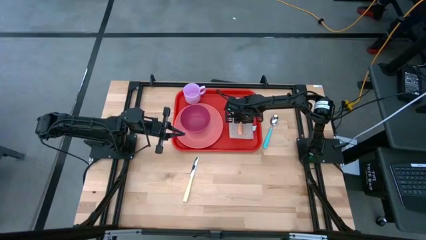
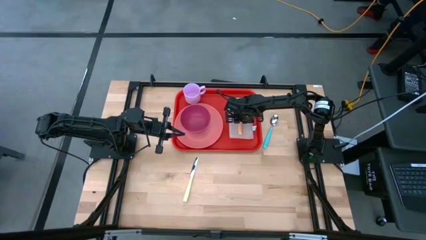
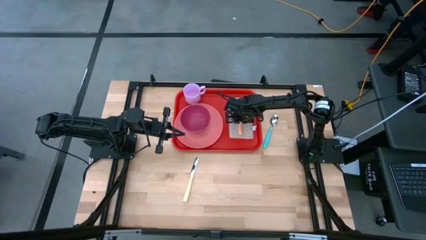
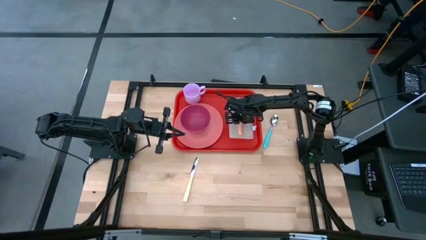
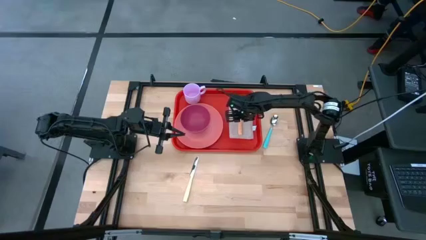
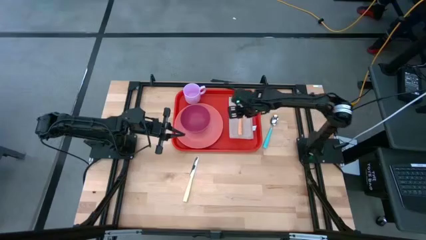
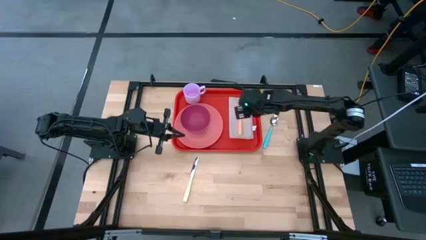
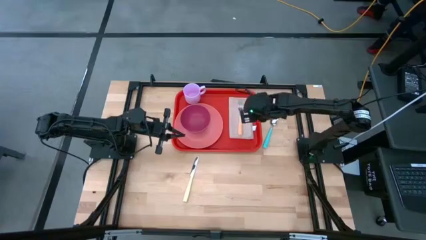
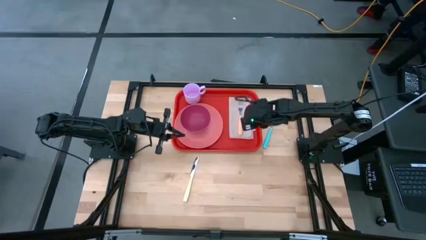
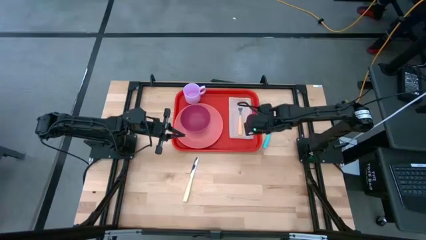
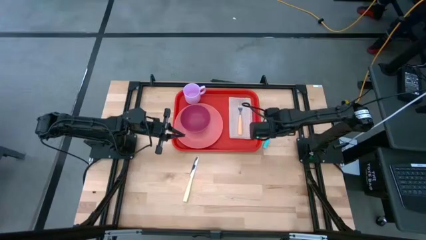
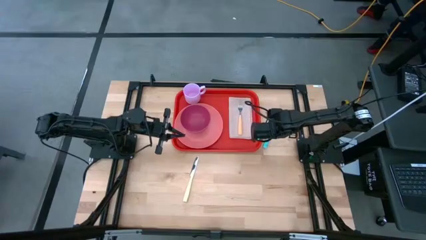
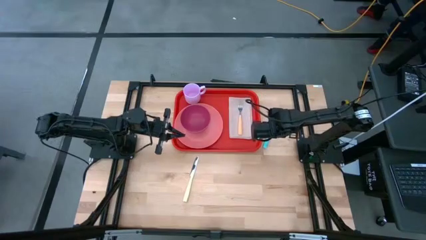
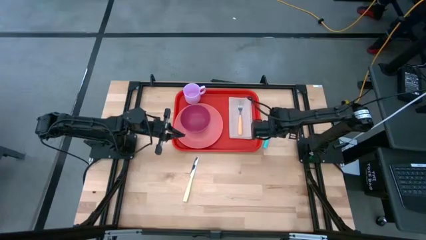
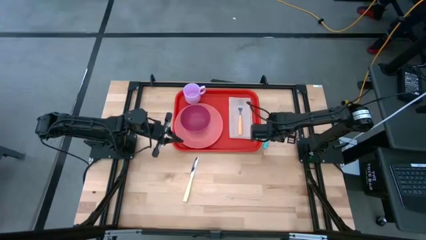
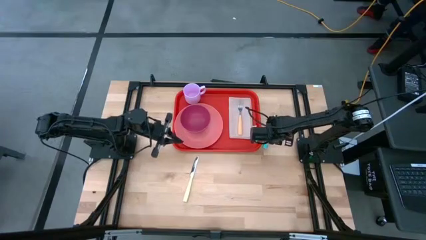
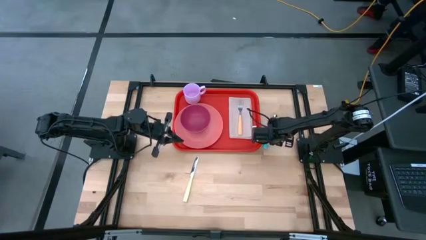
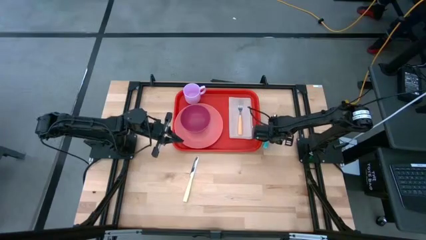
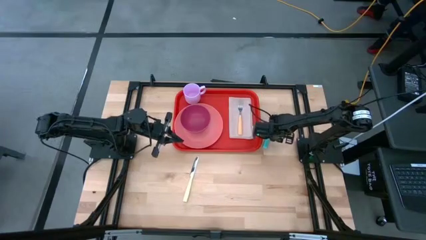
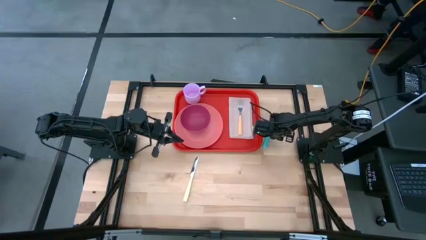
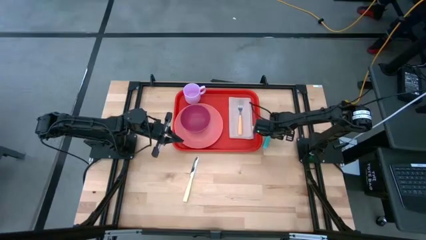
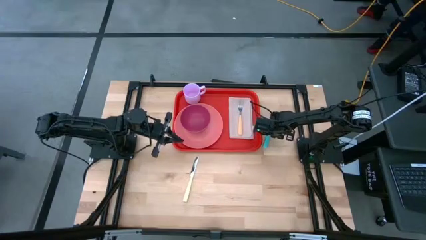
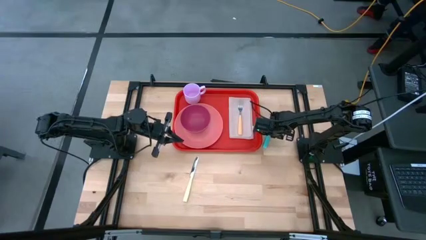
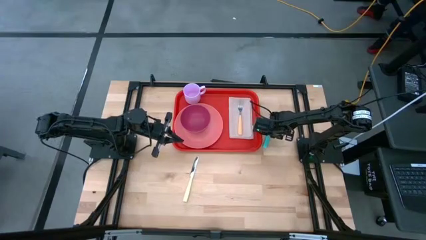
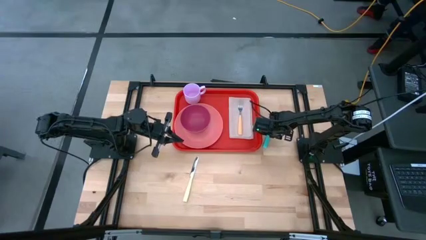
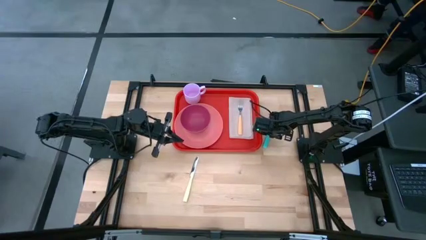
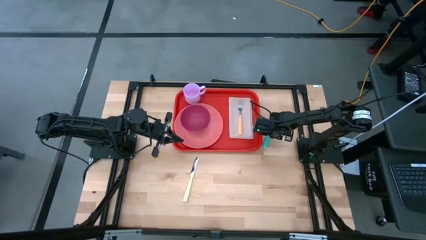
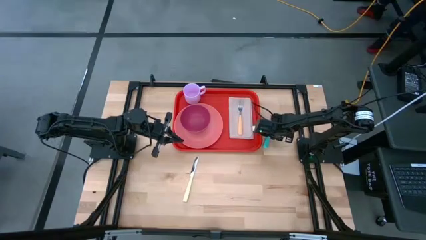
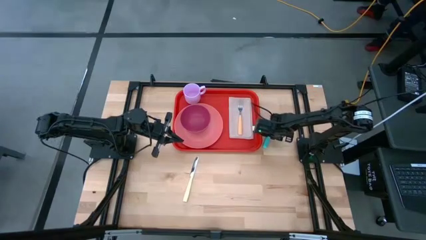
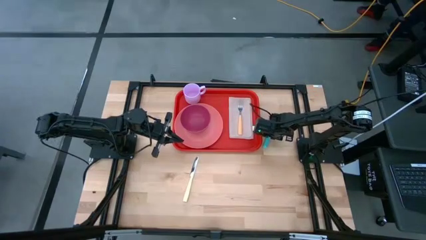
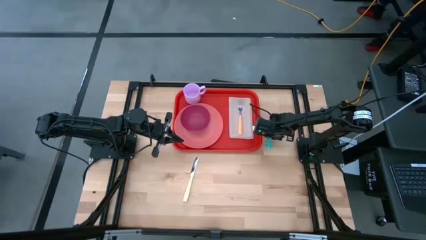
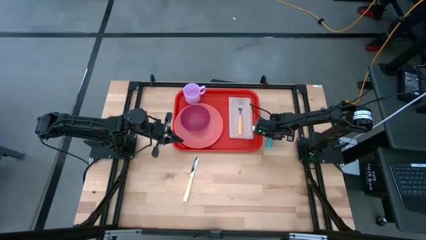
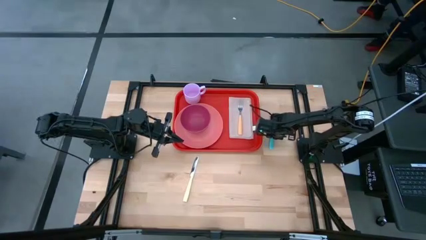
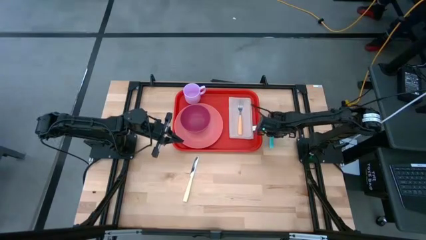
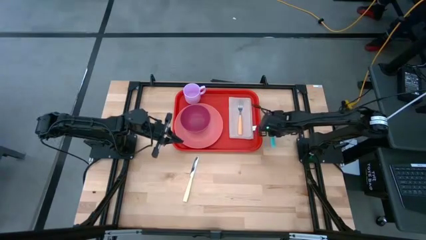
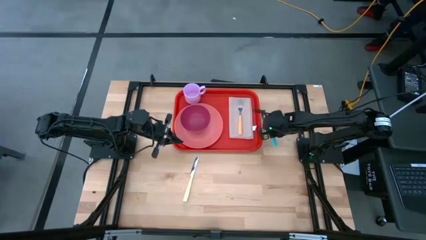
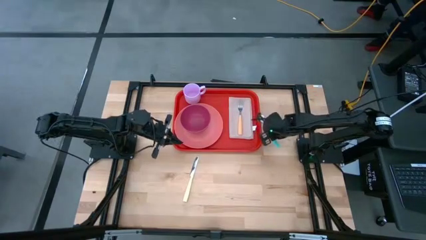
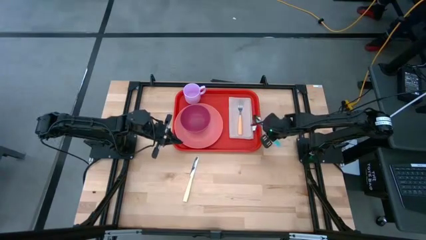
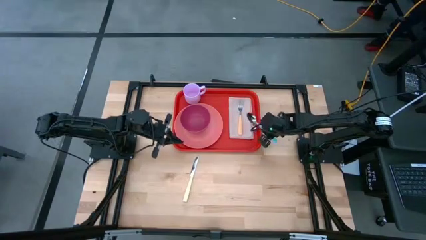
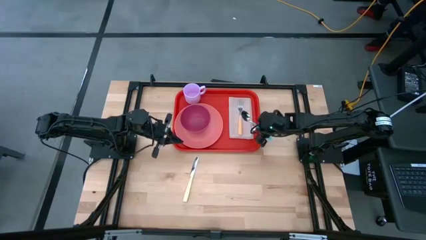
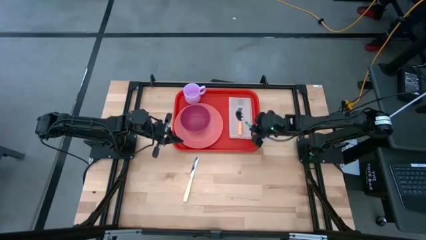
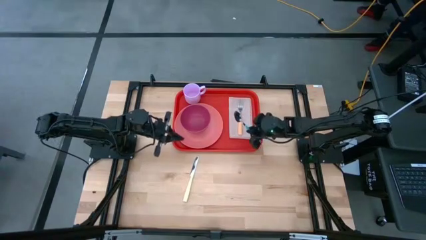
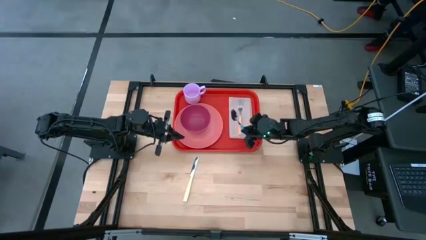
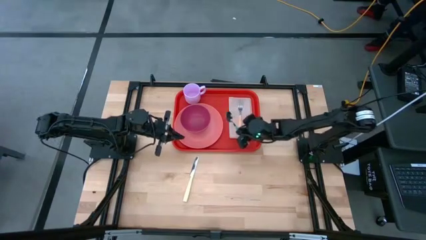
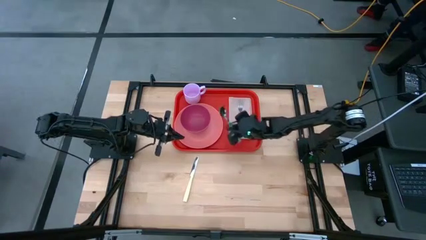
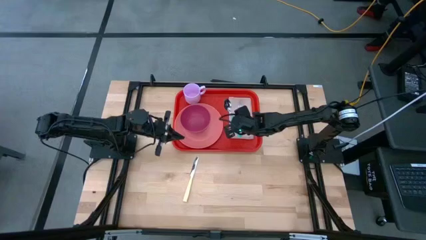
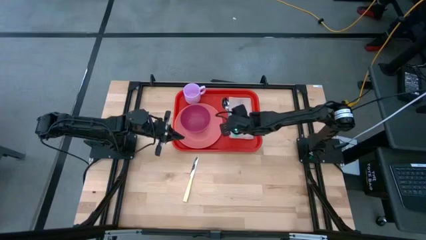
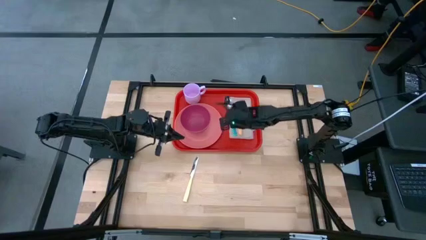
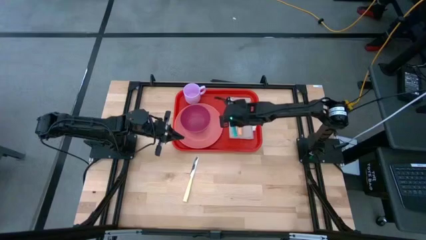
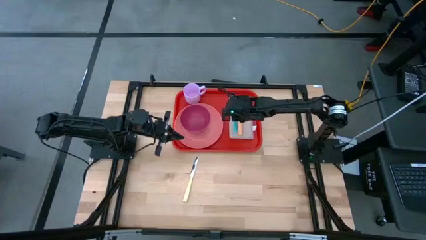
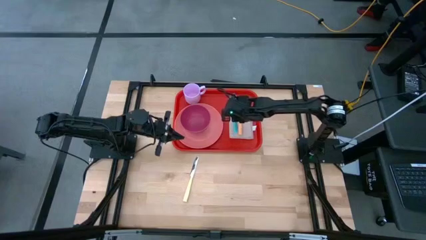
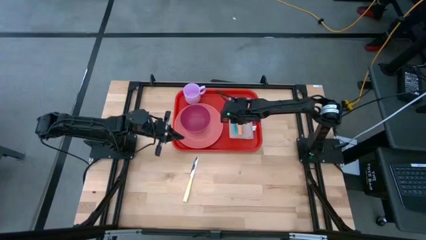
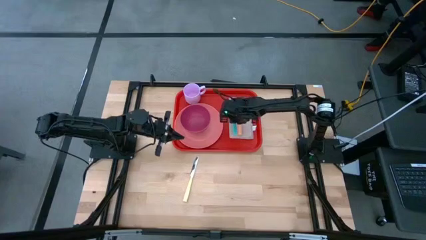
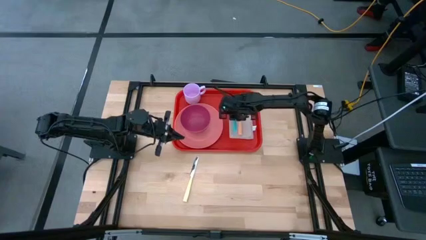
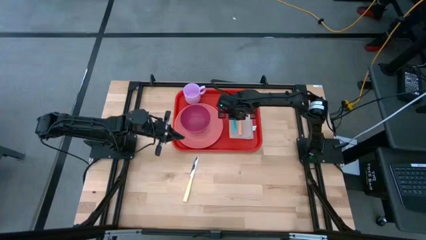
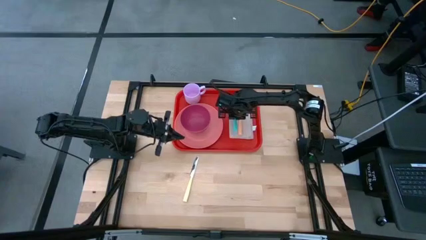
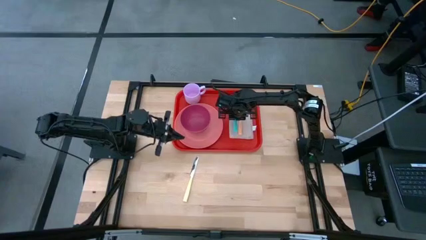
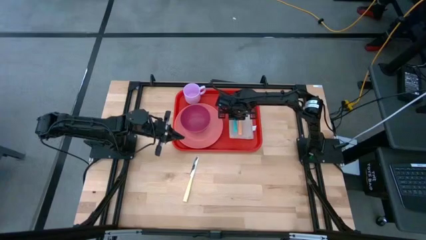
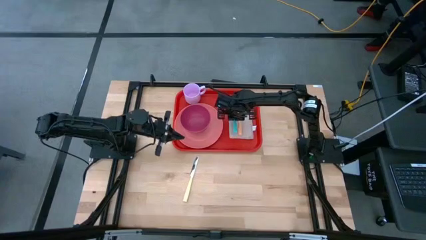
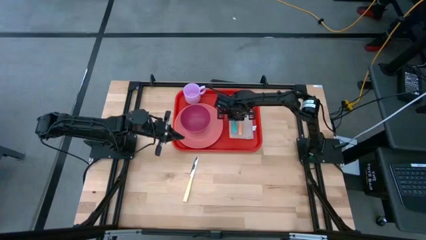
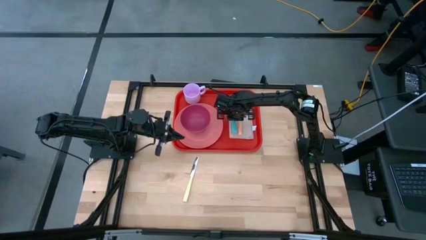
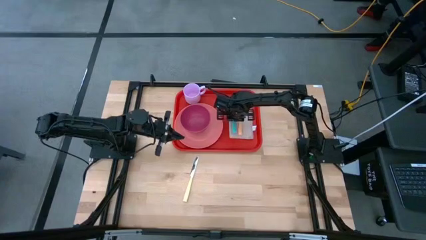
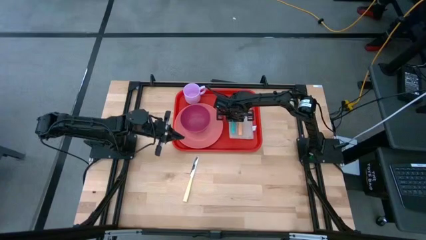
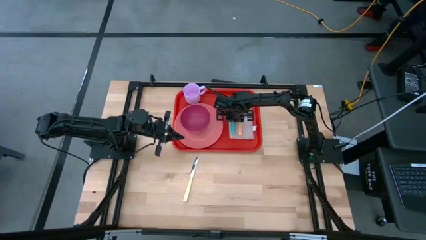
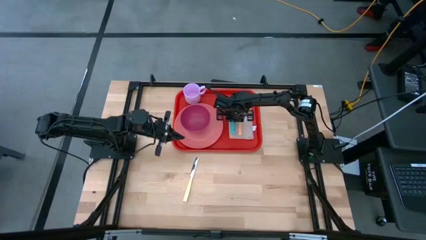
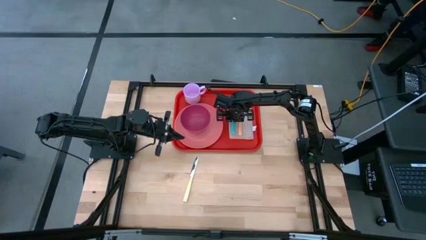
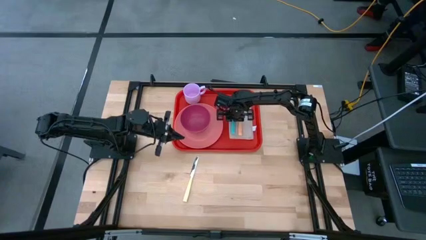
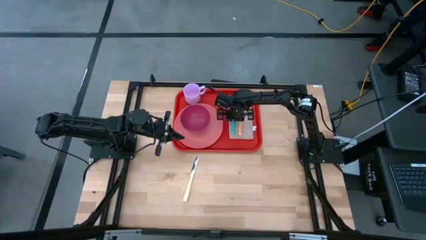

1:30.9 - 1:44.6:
Task: Set up tray
Put the blue spoon on the brown napkin to the left of the orange fork

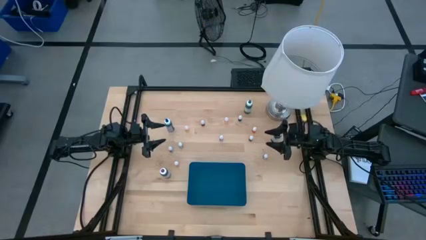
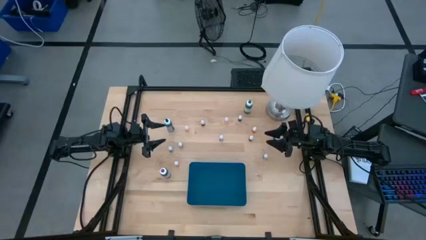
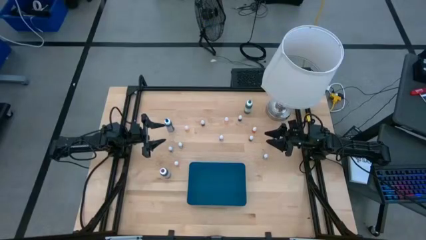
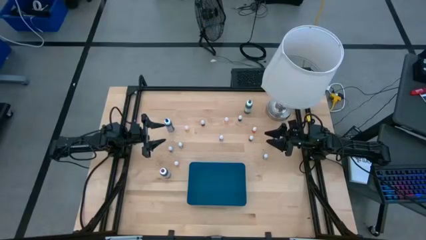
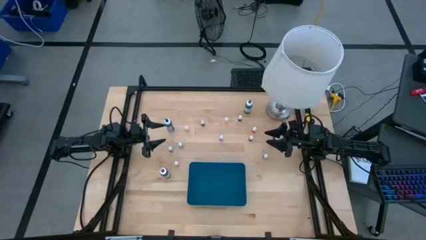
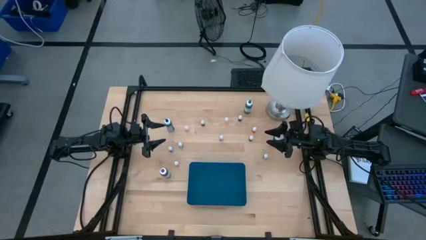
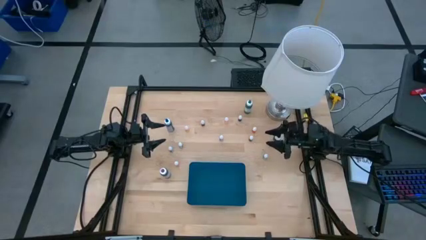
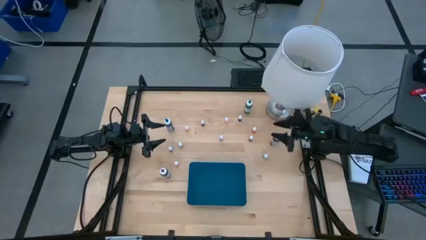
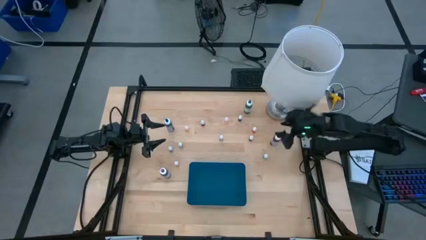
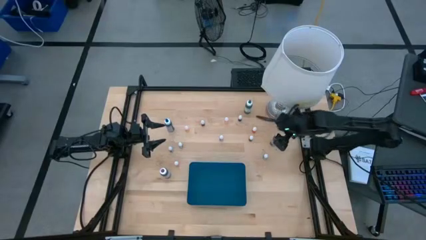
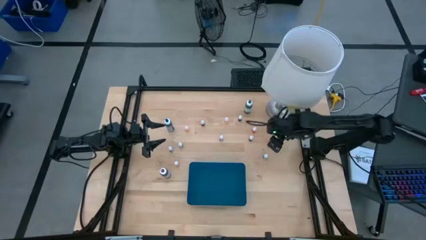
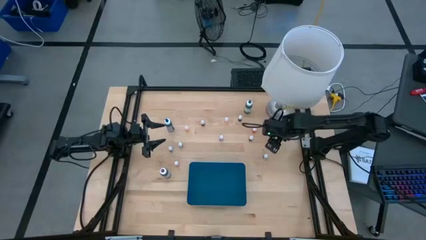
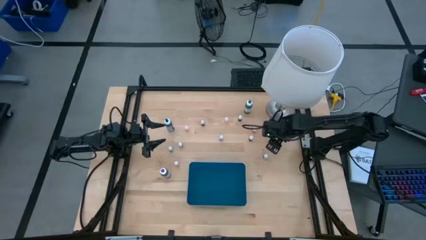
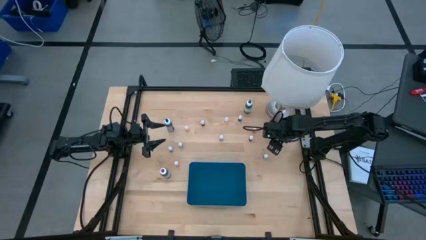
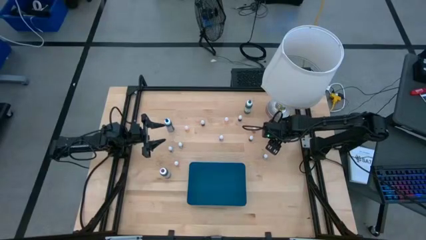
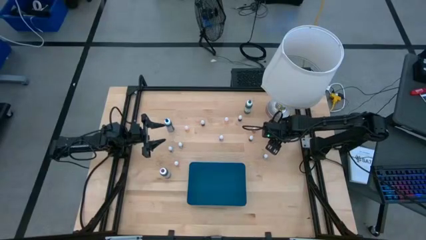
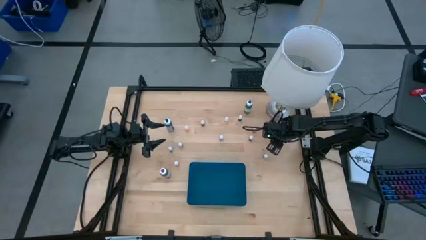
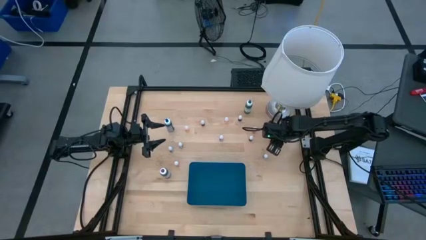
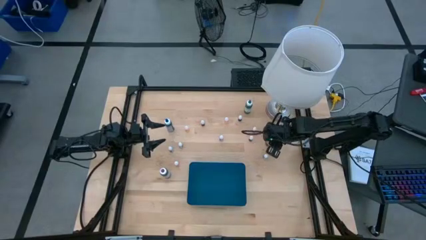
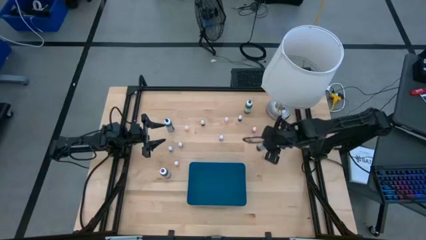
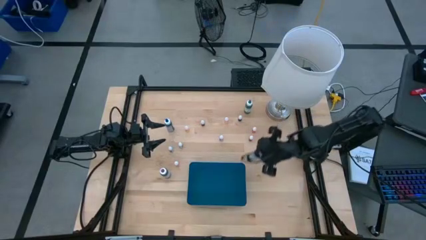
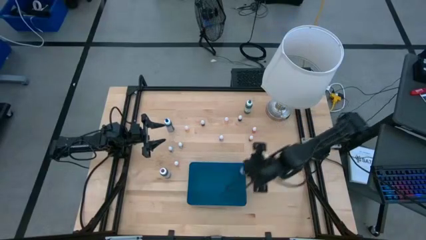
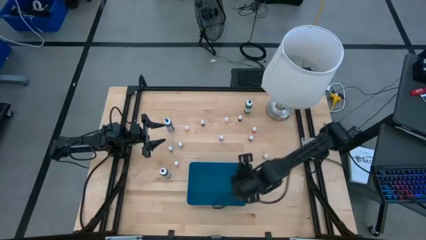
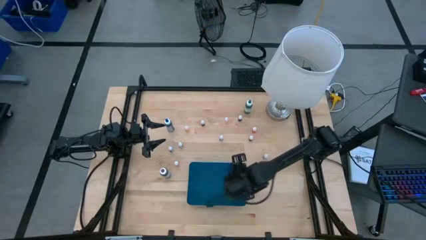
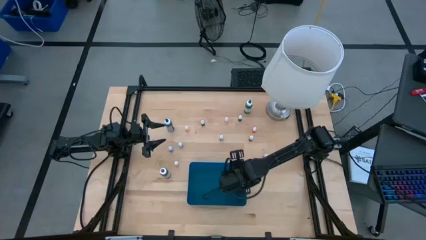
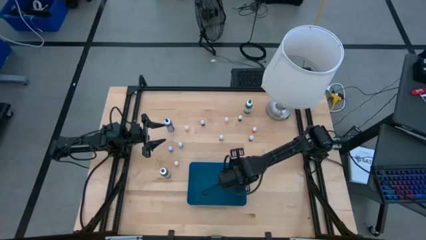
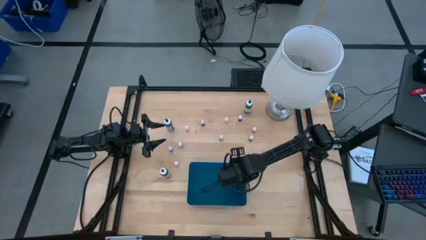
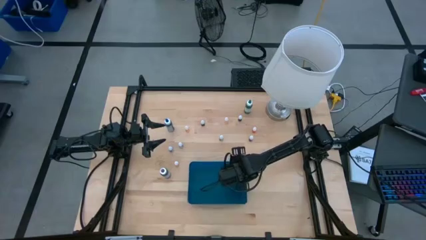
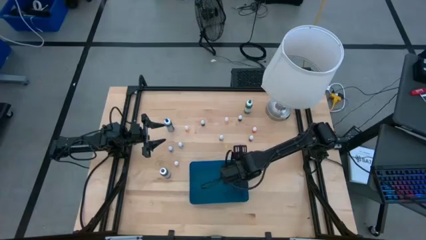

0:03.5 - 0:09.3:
Task: Pick & Place food coloring
Put the large black food coloring bottle into the blue container
